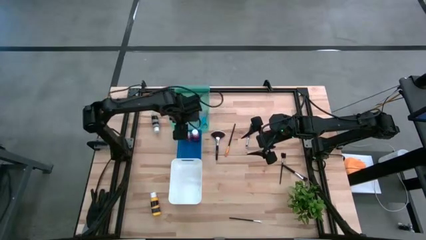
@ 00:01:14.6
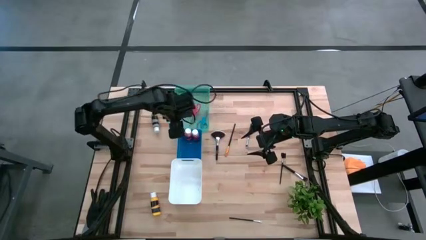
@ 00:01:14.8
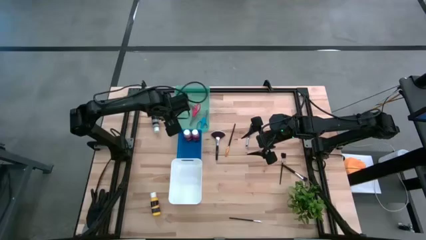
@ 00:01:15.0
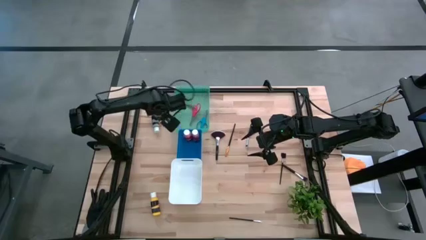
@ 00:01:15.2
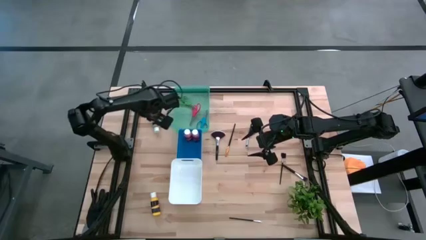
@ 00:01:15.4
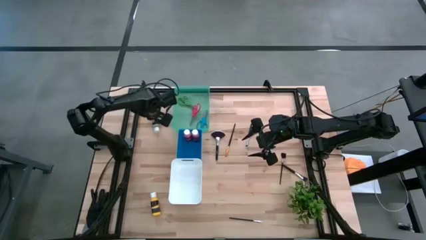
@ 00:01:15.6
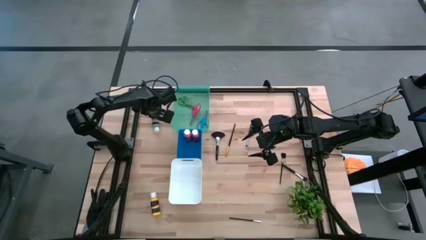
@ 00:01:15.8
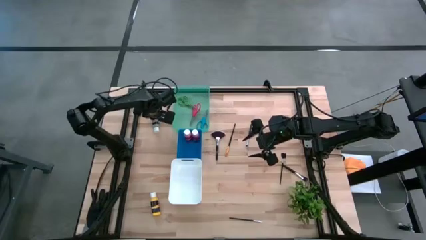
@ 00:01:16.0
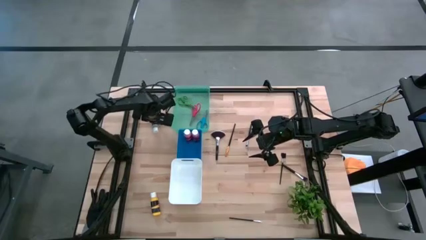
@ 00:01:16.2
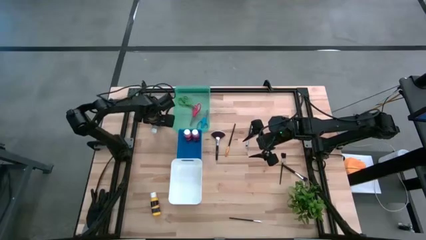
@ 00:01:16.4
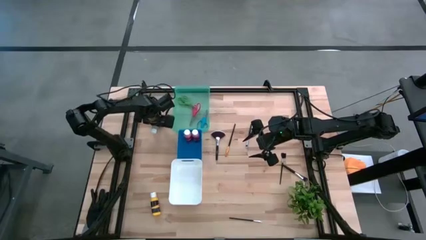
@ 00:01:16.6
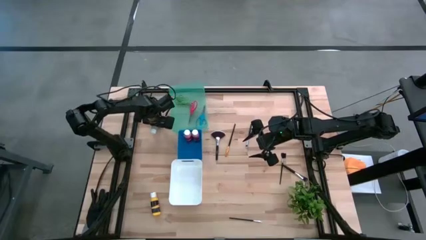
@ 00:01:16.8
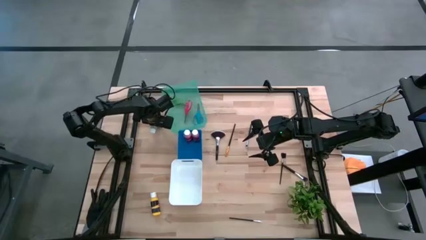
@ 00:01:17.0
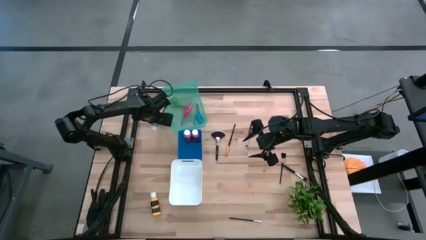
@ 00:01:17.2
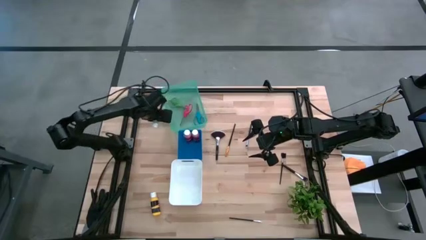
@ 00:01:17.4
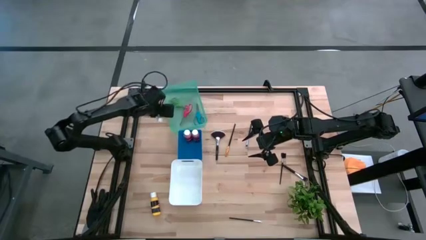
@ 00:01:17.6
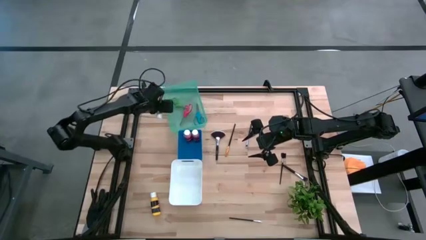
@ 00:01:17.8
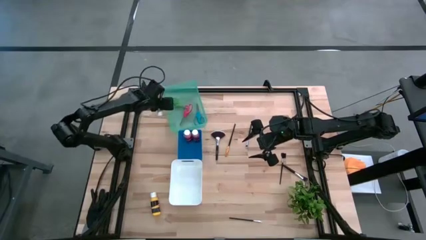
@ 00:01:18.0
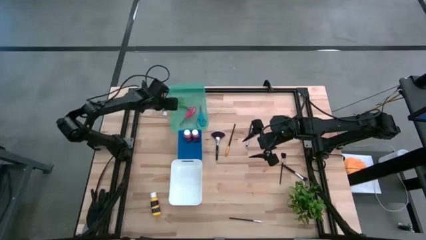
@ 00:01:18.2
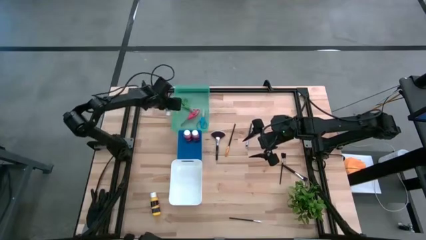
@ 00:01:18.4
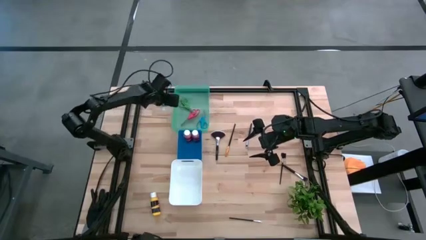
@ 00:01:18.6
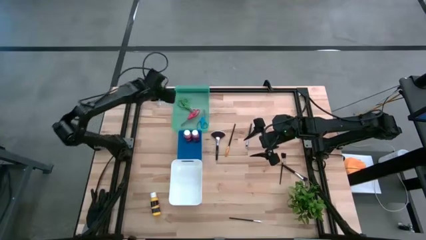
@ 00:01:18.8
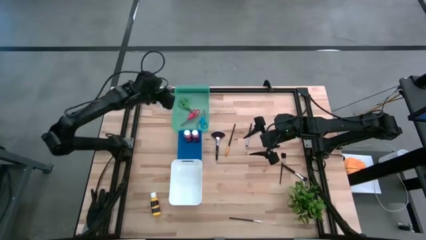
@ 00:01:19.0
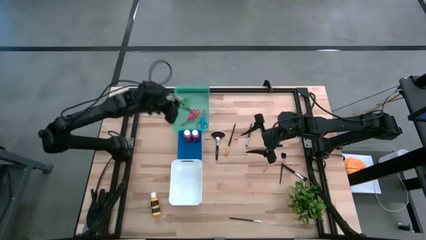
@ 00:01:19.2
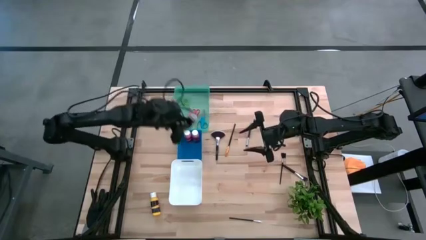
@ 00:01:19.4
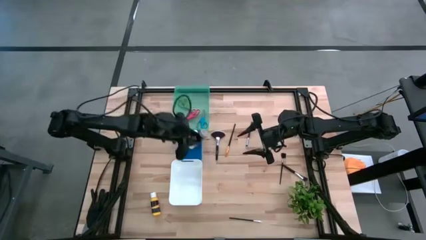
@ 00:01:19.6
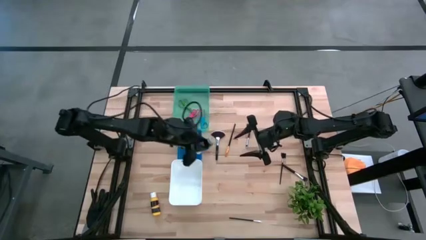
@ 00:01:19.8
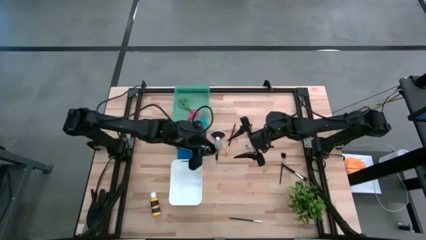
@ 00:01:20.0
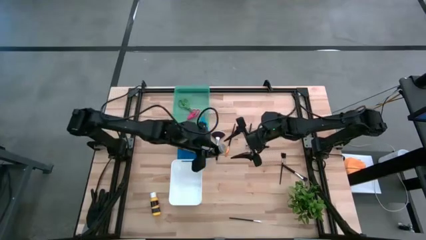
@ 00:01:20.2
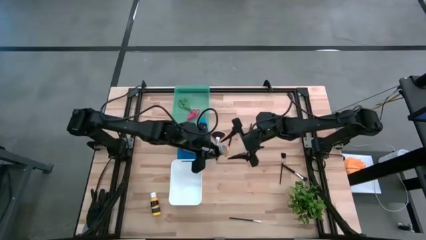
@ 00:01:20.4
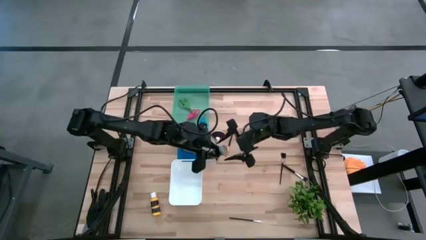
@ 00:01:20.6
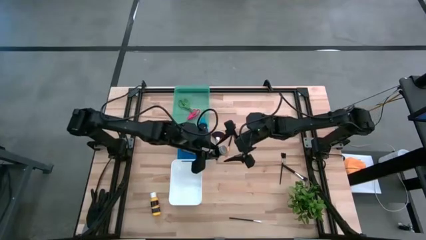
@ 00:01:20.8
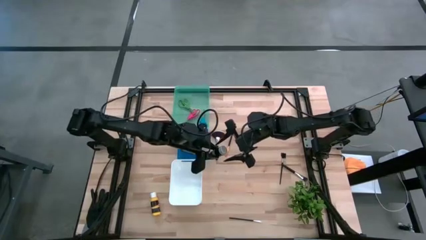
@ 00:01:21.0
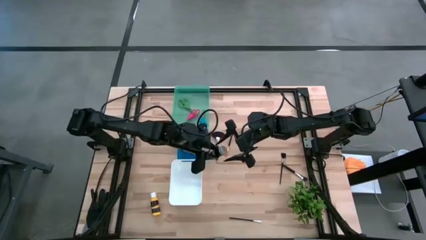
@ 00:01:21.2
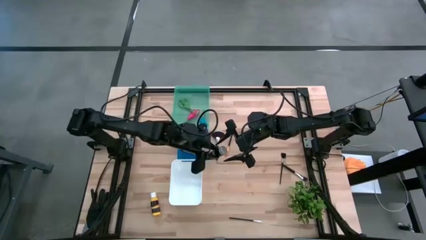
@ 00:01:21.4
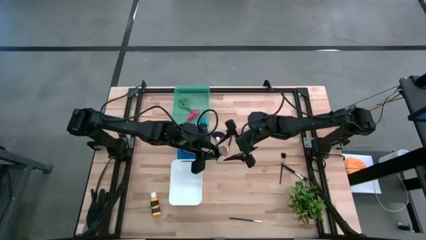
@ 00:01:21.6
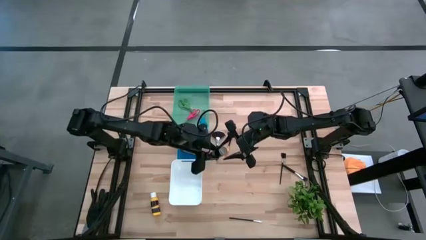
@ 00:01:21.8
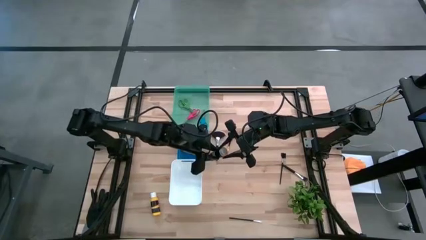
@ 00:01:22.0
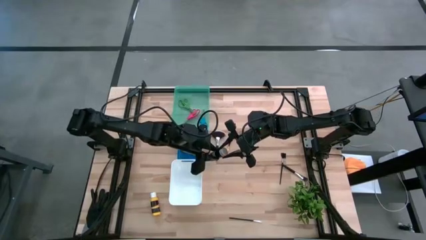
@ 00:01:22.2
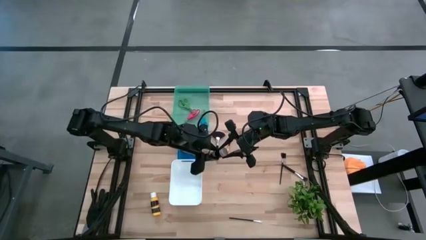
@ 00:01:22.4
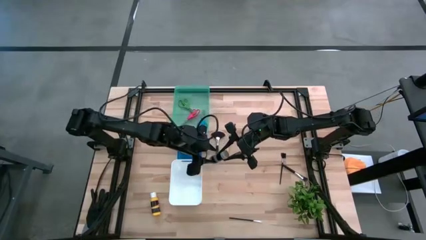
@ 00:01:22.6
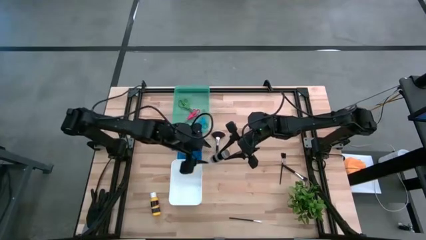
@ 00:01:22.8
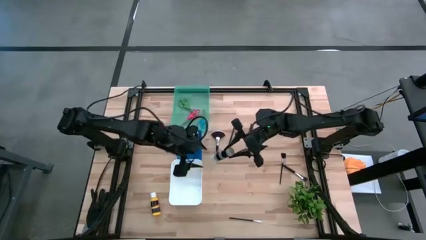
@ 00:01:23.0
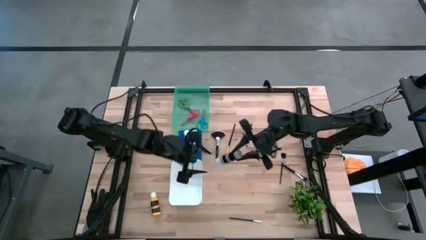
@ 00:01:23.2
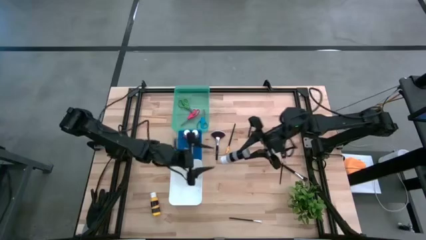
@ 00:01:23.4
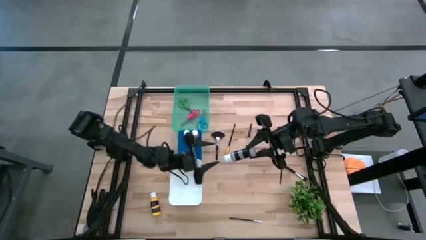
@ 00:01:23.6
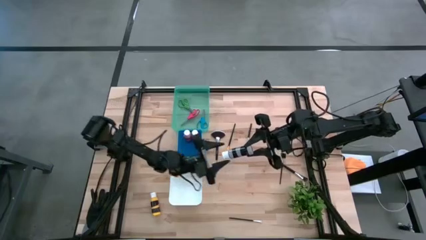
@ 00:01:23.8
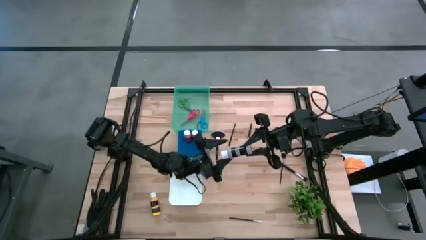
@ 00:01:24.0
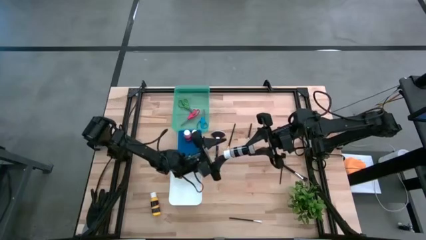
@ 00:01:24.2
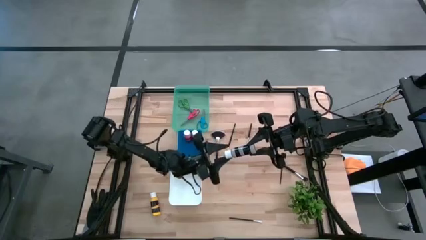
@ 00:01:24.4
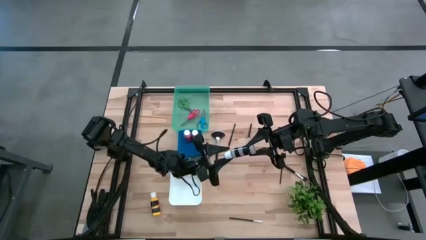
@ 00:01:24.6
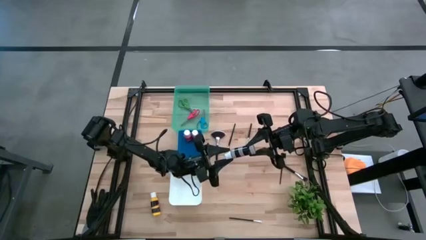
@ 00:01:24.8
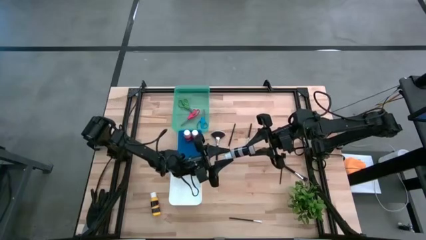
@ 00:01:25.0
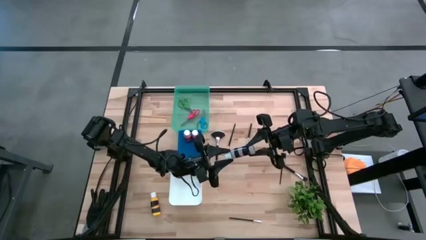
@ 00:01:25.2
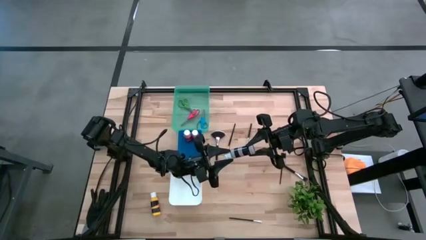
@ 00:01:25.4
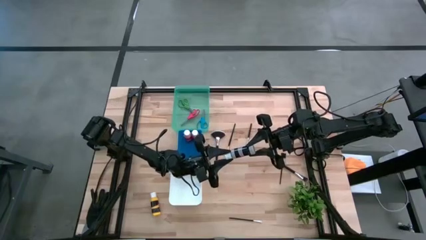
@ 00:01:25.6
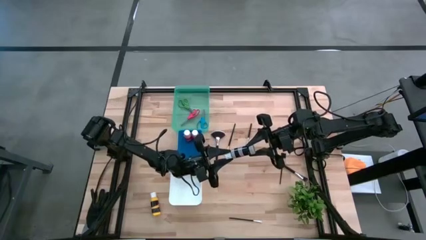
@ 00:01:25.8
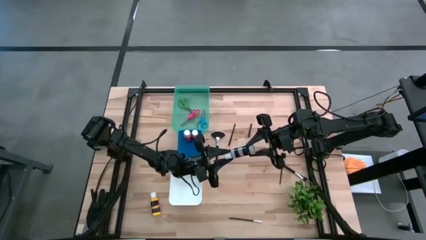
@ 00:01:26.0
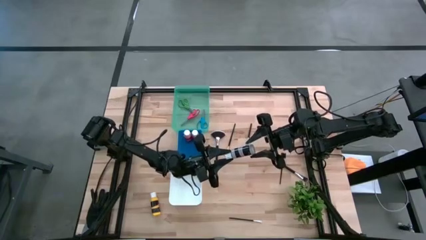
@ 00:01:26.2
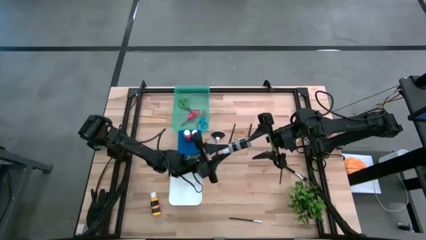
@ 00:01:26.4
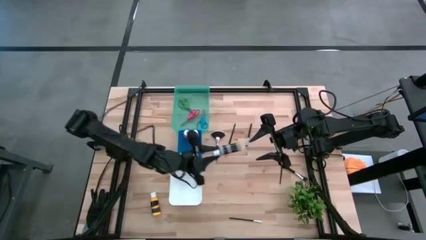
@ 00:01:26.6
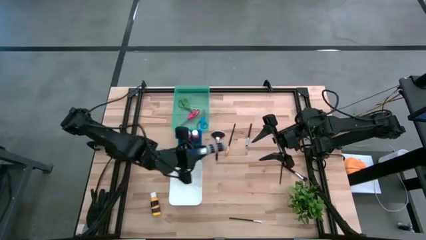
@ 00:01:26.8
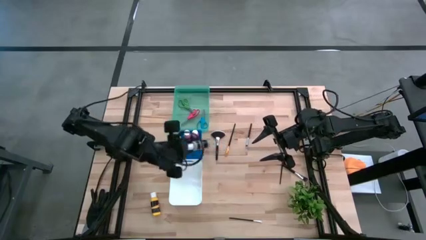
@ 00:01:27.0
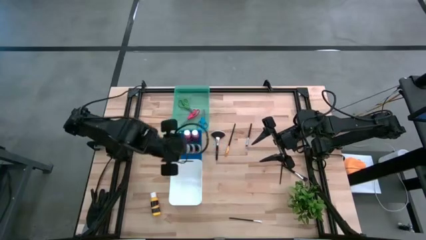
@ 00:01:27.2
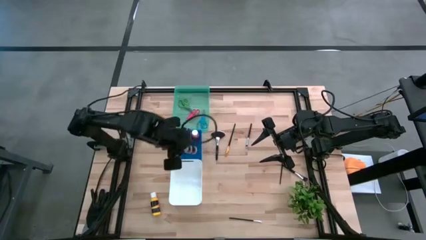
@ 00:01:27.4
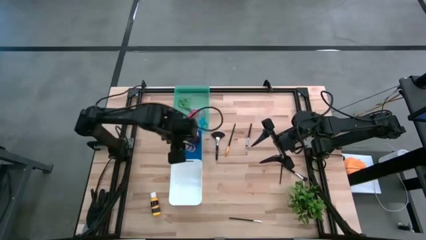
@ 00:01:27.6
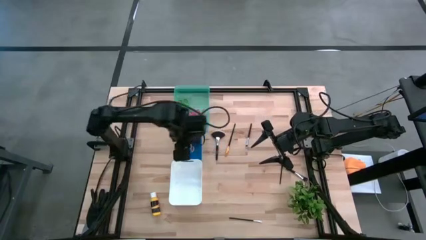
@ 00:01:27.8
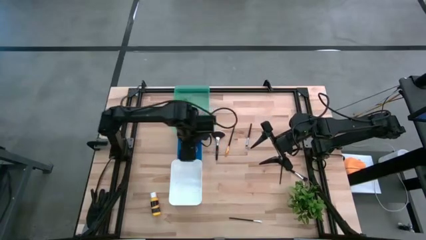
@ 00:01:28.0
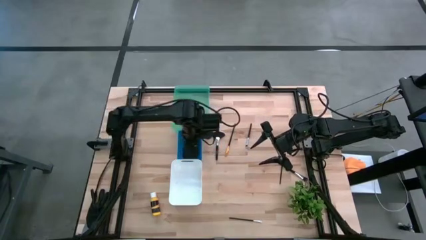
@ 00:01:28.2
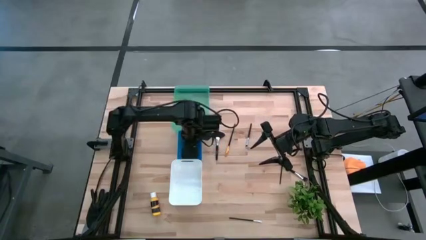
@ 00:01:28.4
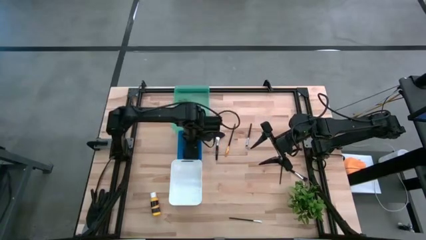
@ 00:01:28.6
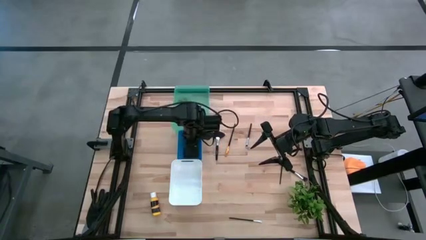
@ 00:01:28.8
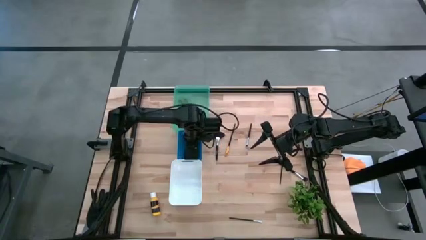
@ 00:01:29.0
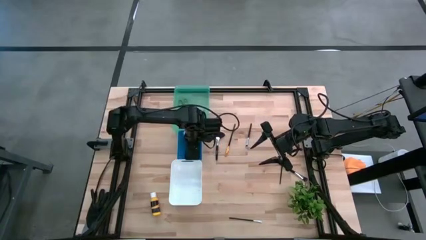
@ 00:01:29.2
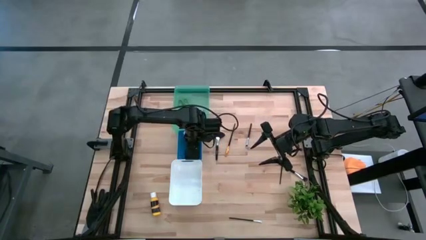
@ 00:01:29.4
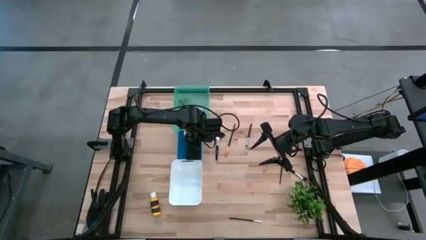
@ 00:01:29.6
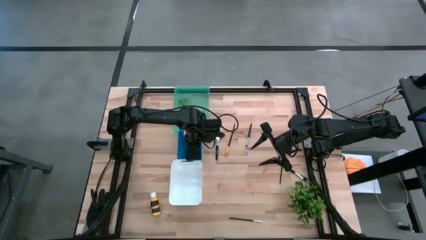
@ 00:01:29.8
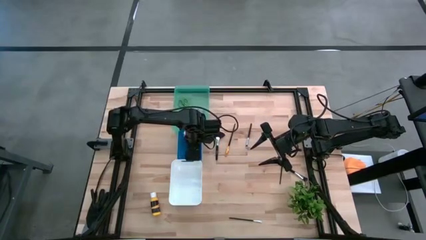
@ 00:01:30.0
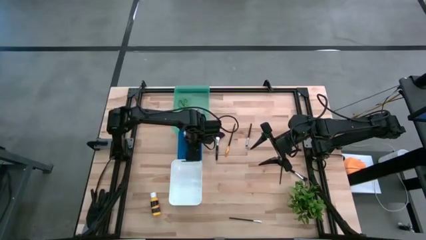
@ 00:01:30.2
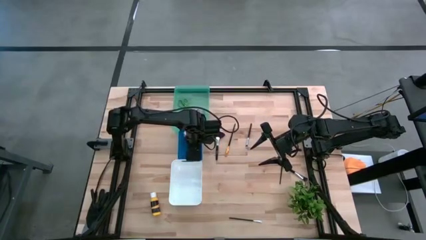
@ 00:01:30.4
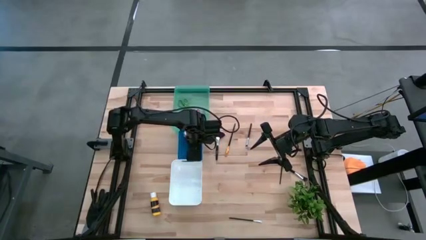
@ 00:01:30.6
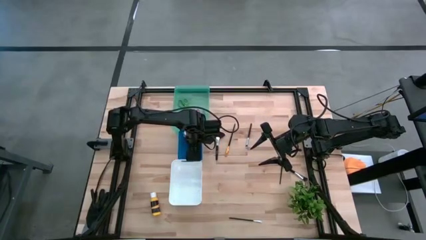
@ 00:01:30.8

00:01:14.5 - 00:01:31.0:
Task: Pick & Place Paint Supplies
Put the gray paint bottle into the blue bin
